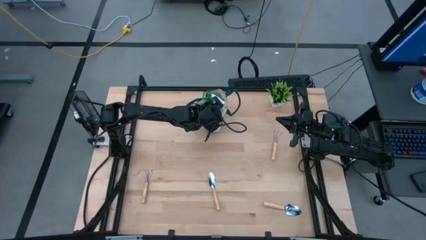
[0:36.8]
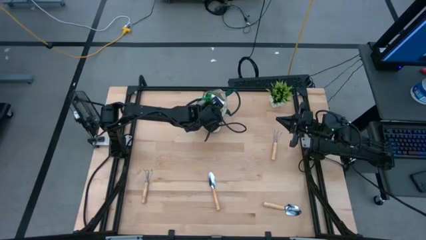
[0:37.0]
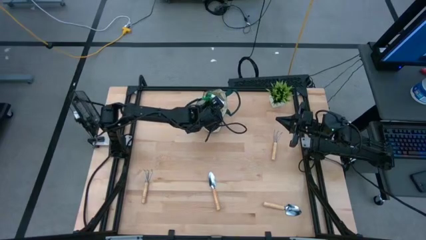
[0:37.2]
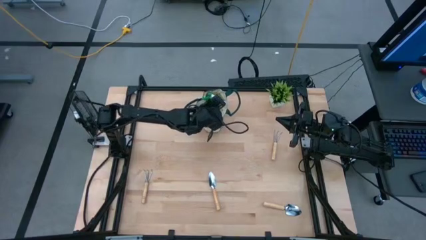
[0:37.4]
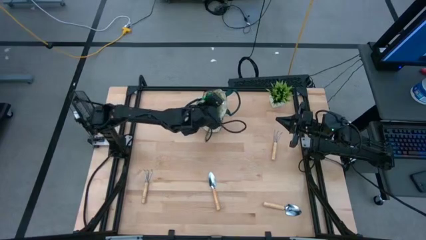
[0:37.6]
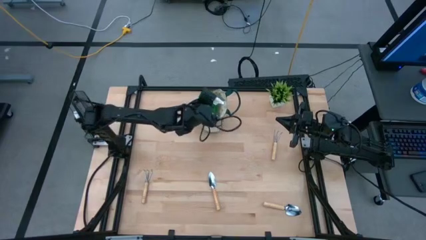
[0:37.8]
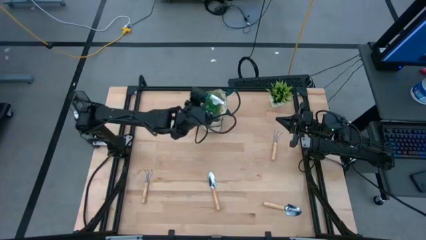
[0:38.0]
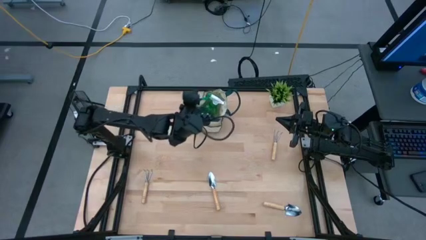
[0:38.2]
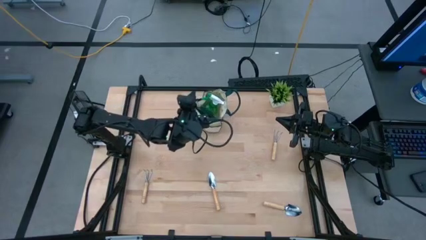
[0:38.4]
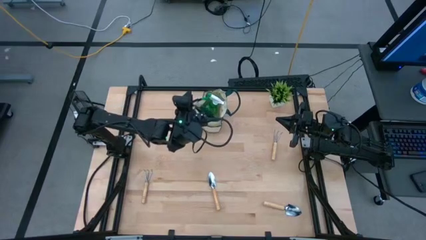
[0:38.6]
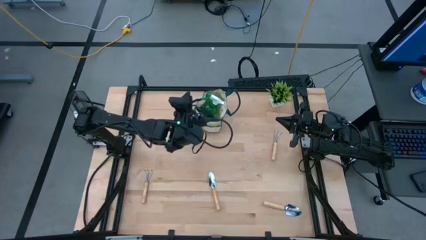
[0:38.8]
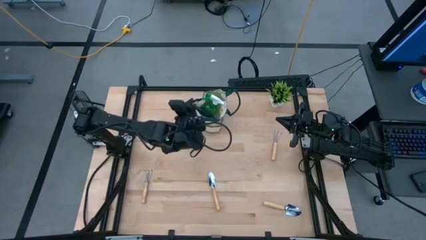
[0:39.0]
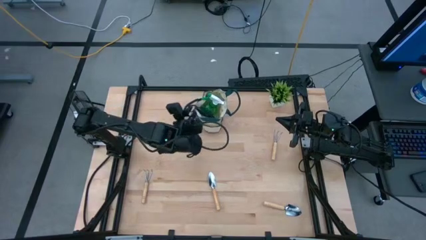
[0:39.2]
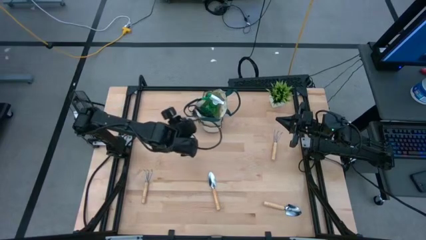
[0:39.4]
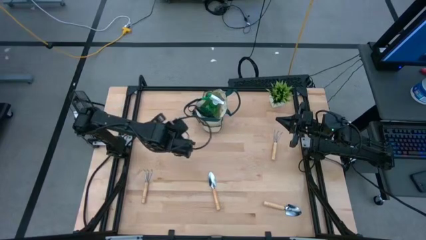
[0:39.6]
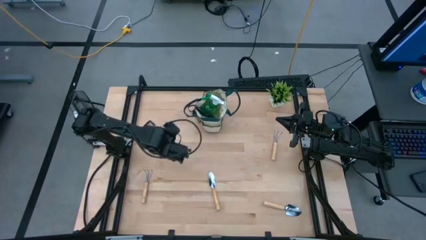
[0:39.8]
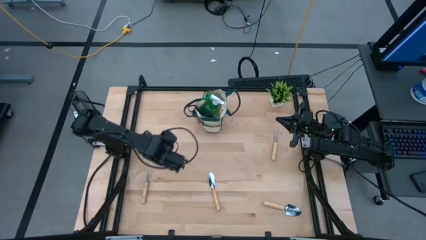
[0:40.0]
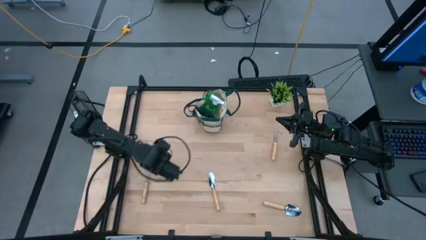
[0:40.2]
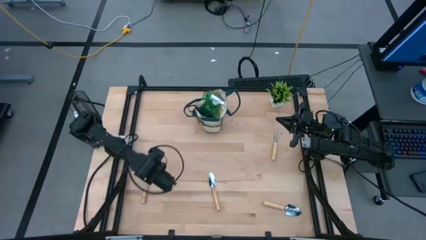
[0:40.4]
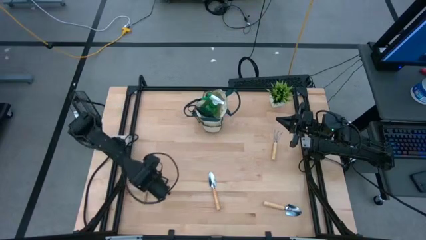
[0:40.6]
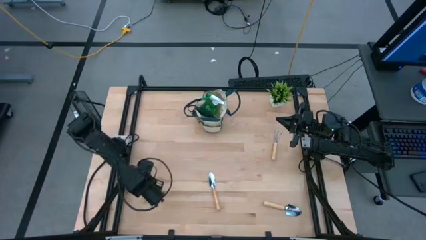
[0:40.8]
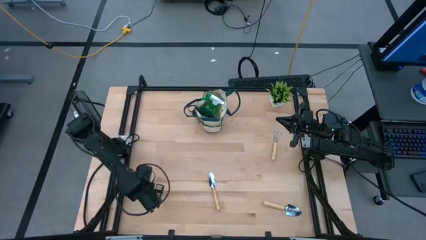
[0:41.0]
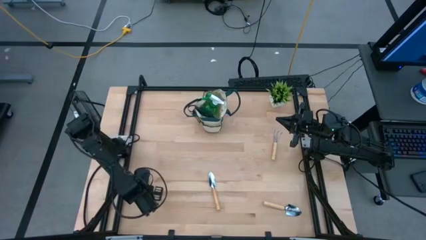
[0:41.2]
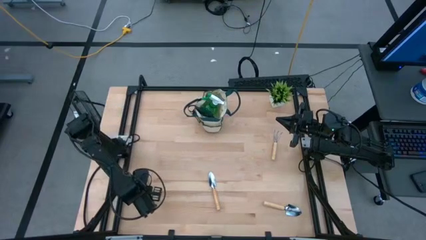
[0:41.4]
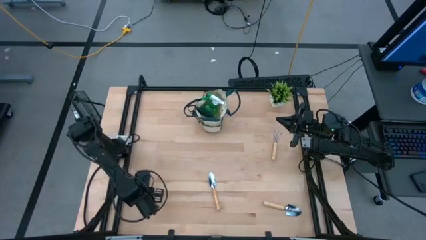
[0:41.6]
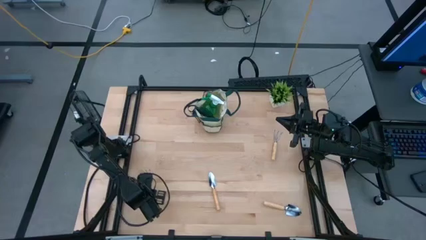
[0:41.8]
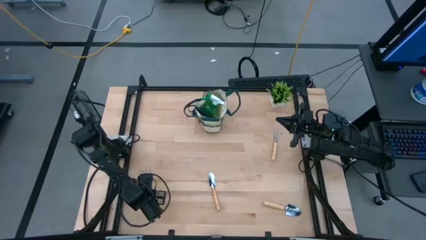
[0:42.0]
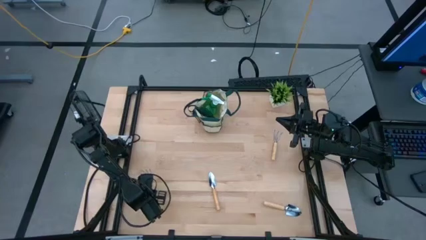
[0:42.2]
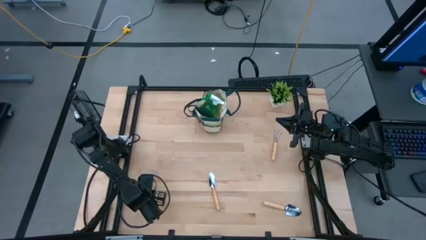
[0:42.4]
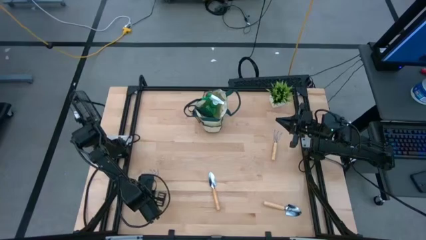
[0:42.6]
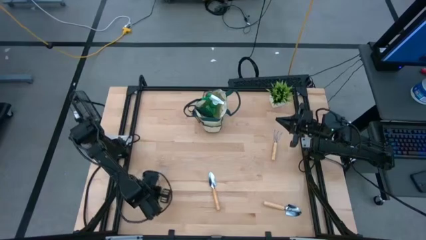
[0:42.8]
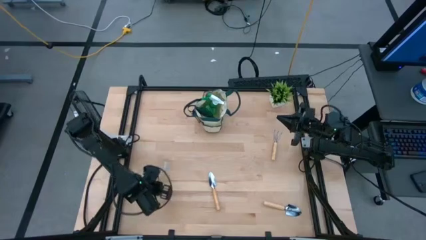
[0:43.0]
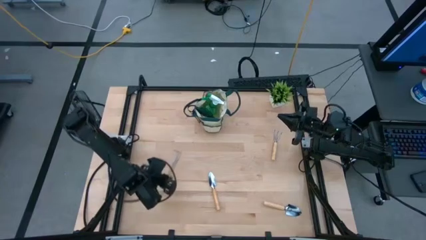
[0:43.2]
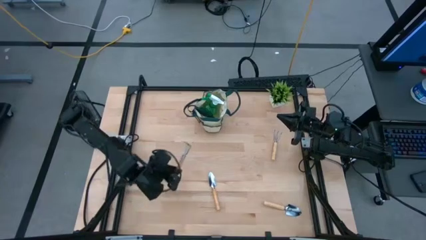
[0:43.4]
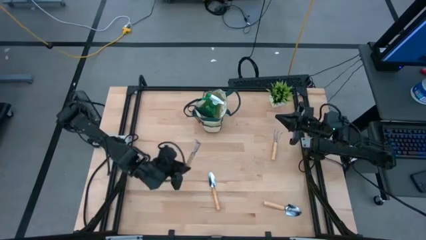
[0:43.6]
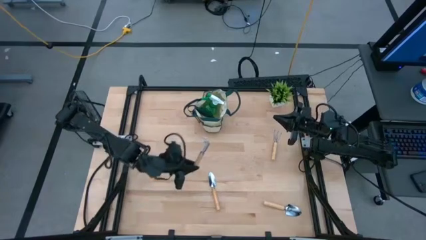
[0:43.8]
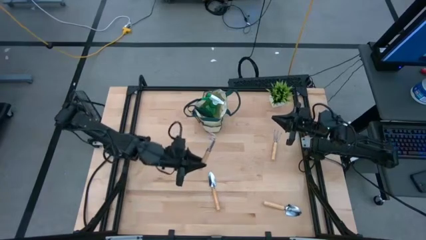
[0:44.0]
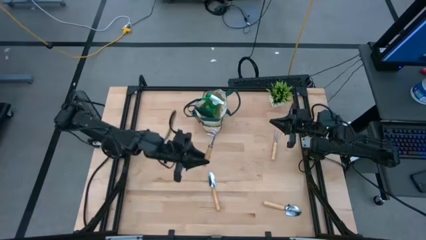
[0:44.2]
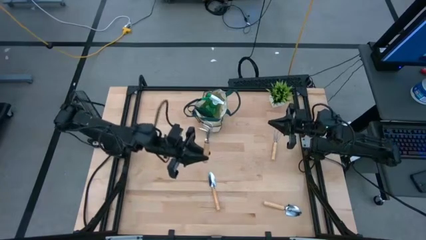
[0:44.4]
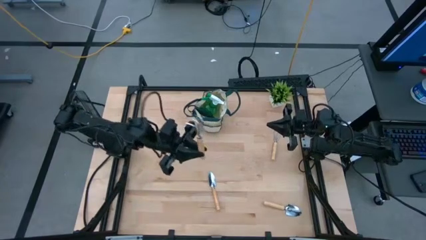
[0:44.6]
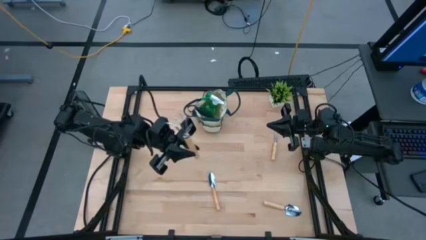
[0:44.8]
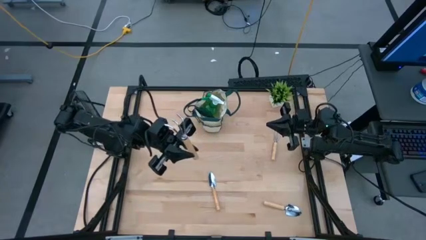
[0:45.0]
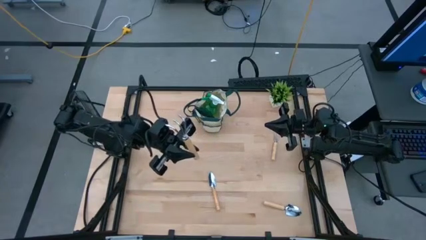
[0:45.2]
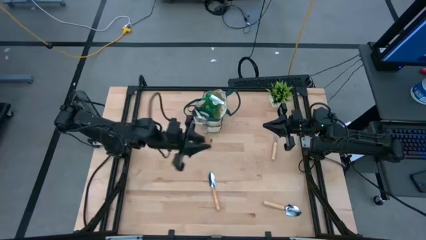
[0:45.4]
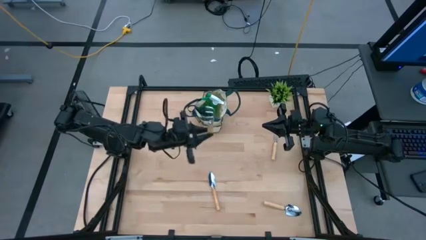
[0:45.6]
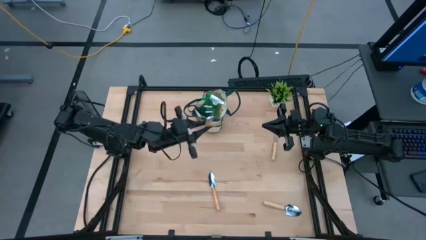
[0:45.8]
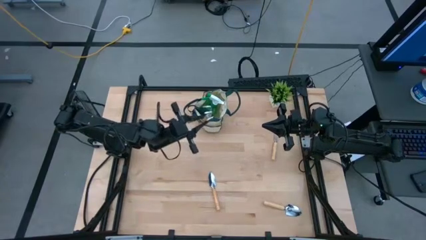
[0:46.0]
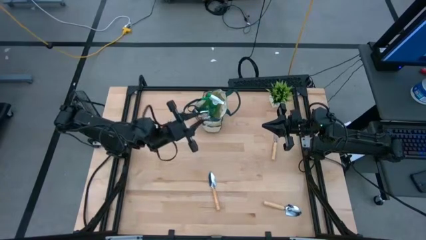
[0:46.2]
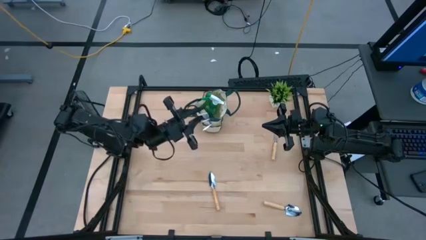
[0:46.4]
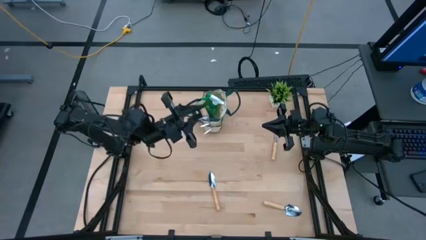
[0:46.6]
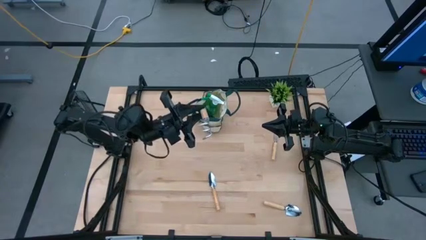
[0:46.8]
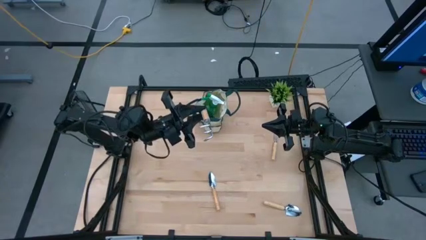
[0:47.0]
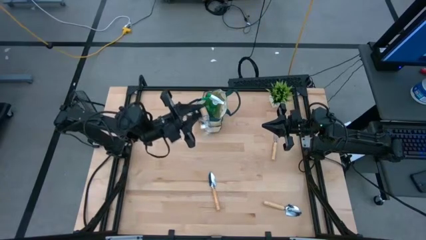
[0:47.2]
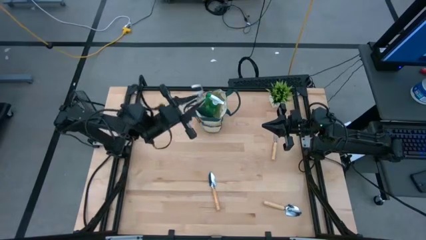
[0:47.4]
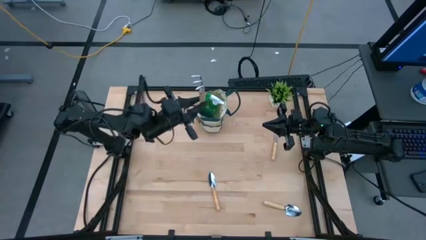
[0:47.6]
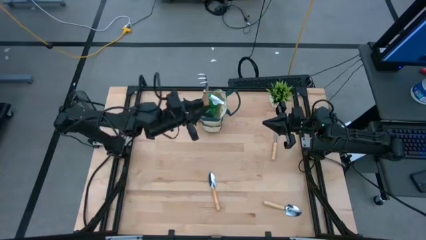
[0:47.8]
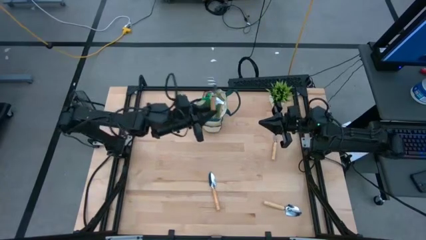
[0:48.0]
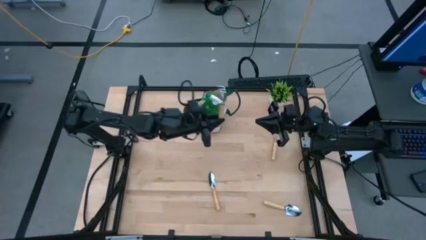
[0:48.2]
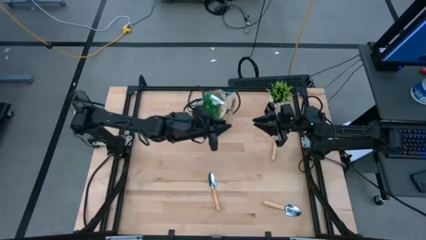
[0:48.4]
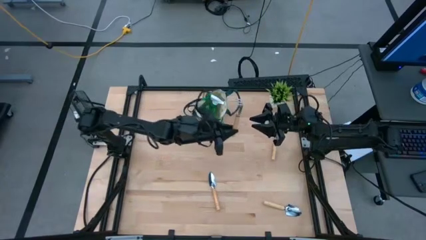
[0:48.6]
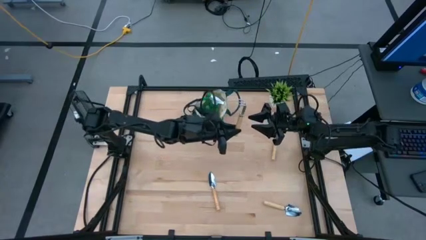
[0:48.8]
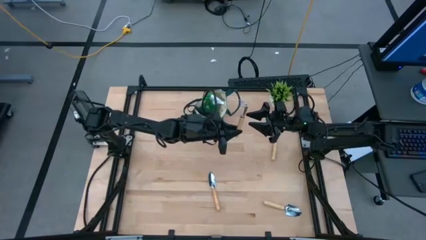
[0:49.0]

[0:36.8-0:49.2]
Task: Pick & Place Garden tools in Gardening bag
Put the bottom brown hand rake into the gardening bag

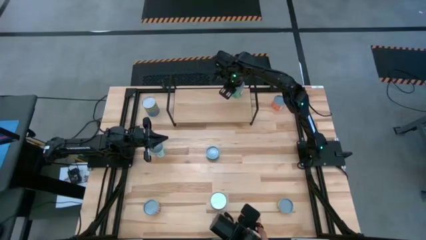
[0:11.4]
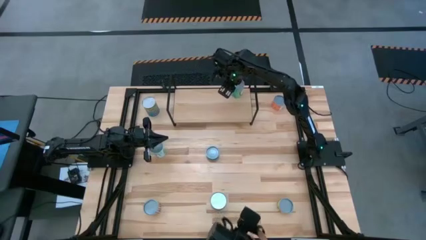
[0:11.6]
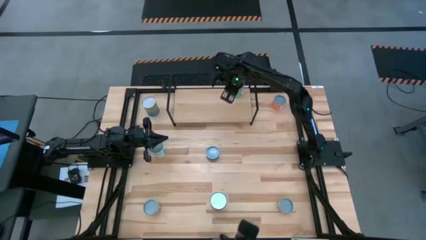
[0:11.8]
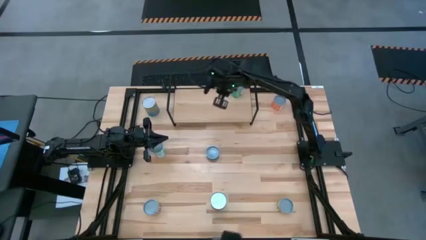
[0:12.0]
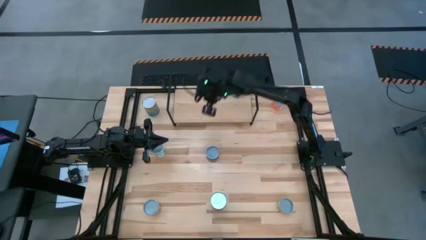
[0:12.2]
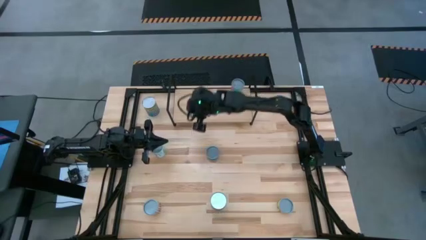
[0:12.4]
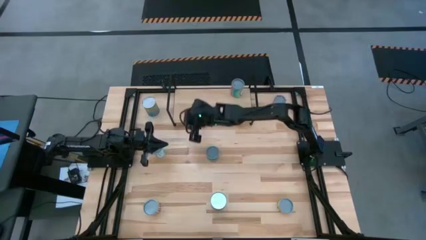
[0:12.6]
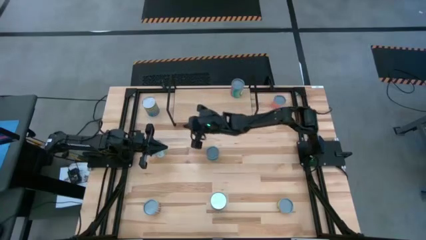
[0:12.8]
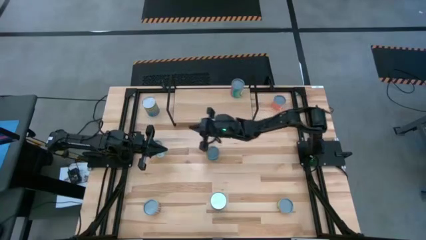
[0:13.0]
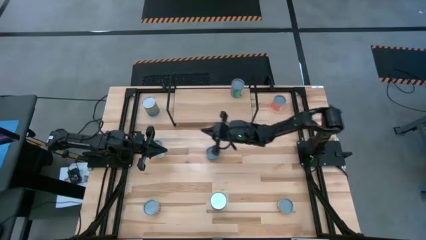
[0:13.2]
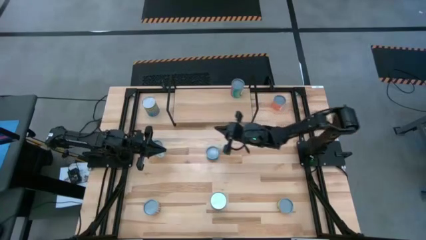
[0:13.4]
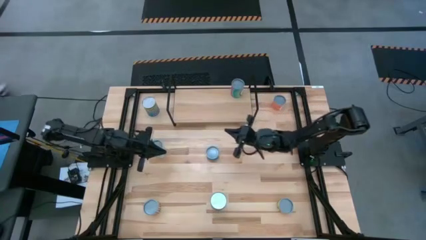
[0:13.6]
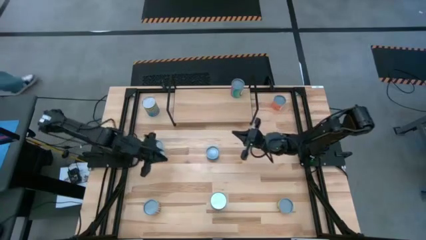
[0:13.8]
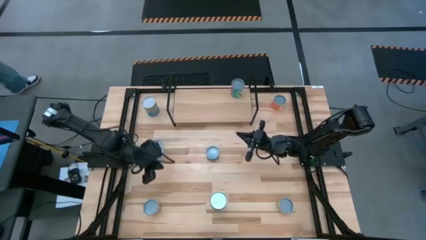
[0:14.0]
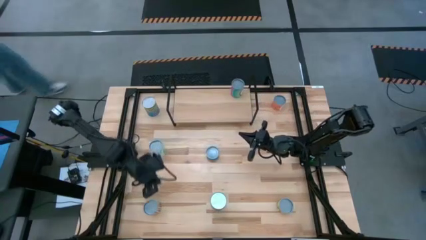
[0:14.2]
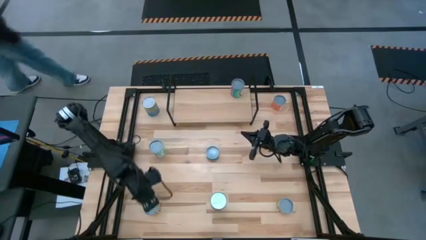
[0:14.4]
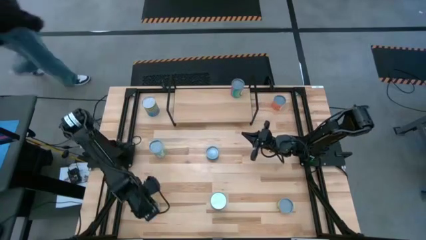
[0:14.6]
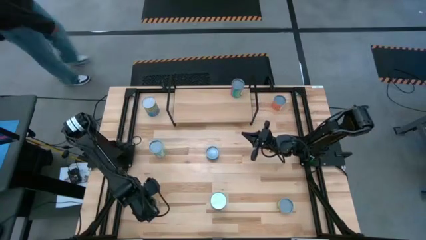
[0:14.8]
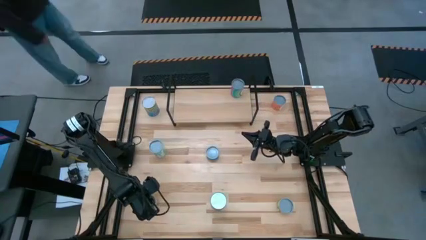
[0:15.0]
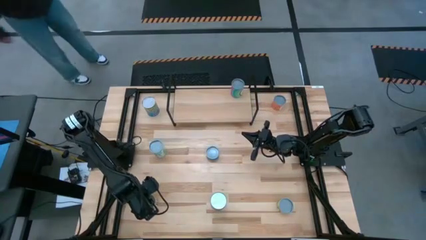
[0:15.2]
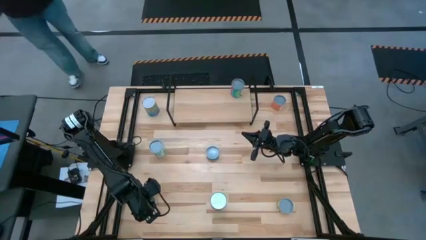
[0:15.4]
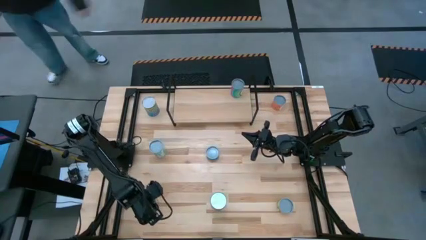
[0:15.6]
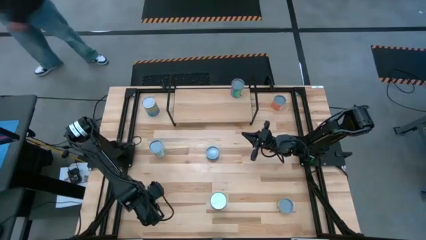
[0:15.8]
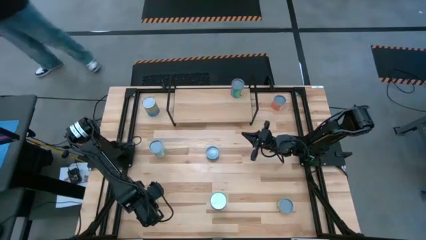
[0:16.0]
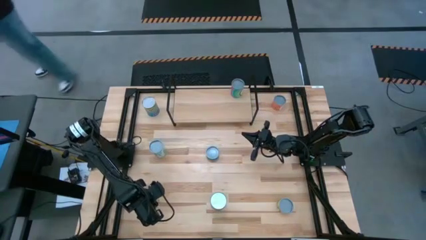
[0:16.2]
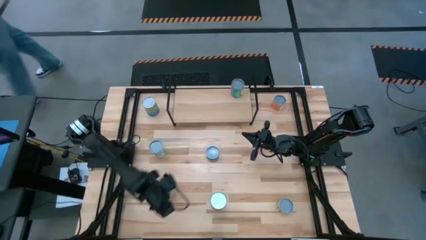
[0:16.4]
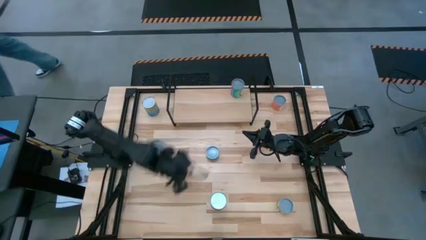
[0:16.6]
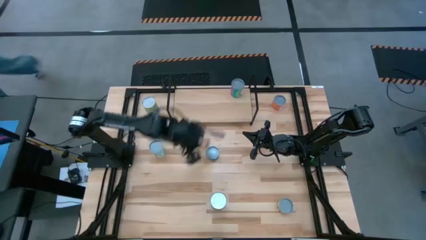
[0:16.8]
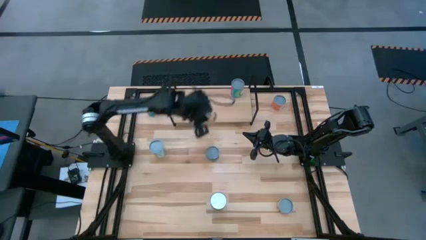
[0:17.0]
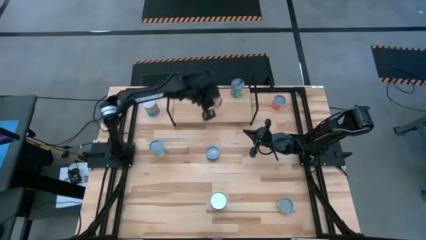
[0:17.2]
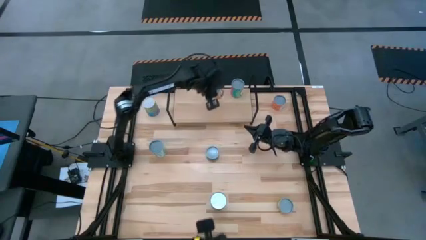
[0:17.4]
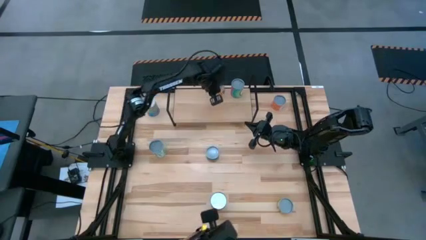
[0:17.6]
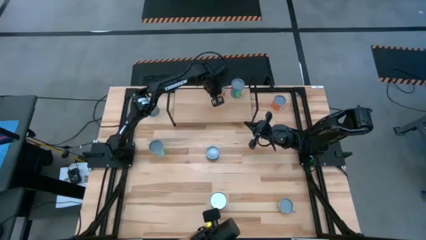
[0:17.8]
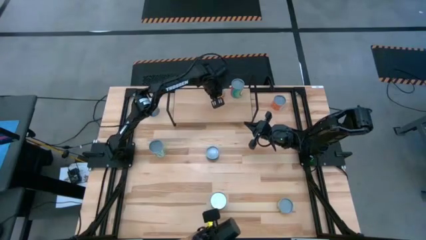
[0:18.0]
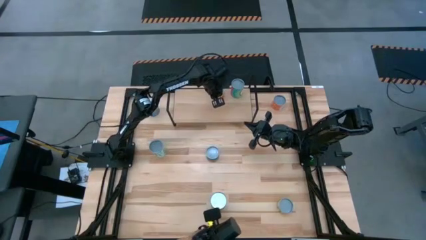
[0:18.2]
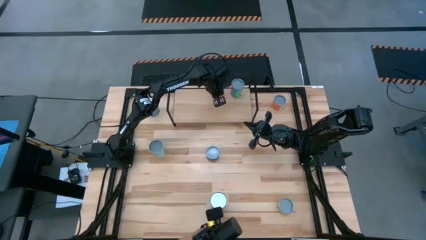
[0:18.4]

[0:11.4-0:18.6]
Task: Pick and place cans onto a shelf
Put the canned black beans on the shelf
